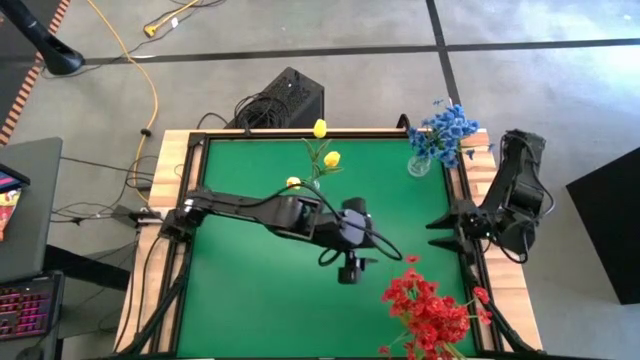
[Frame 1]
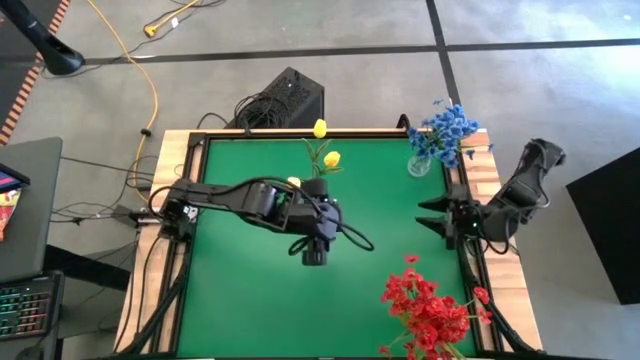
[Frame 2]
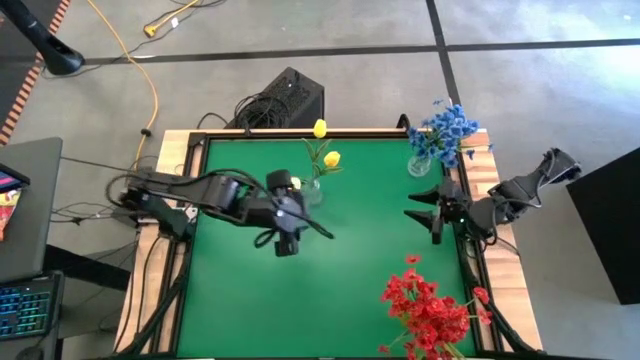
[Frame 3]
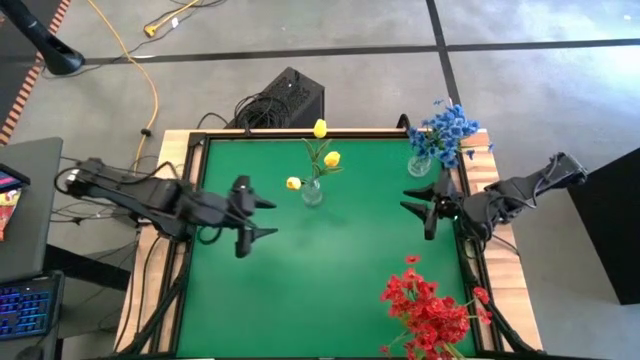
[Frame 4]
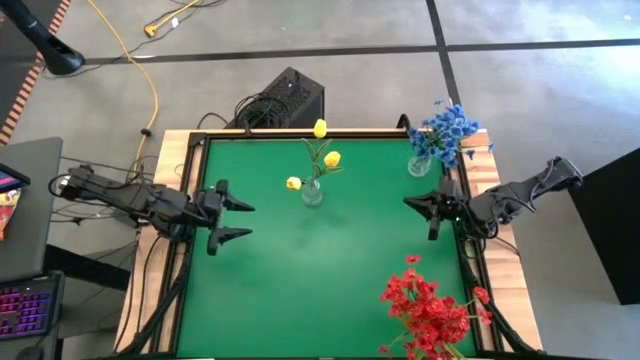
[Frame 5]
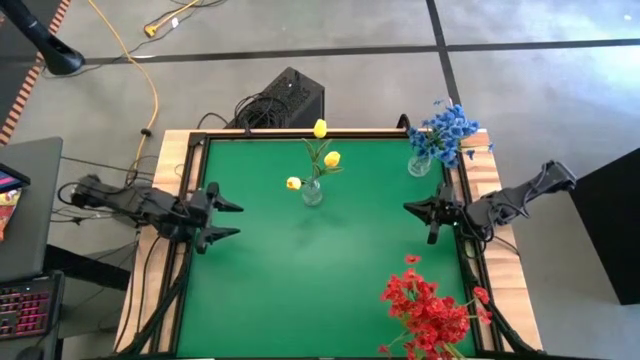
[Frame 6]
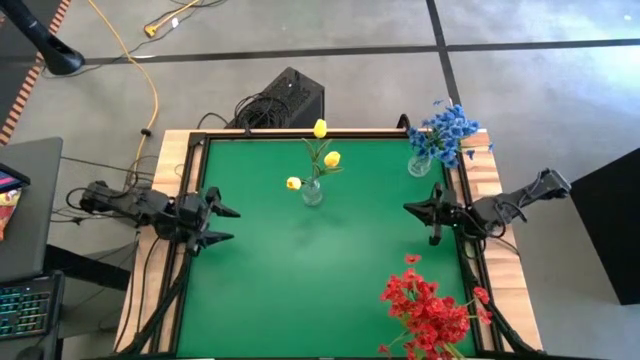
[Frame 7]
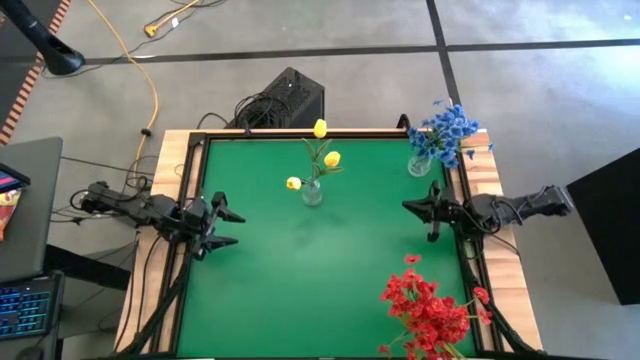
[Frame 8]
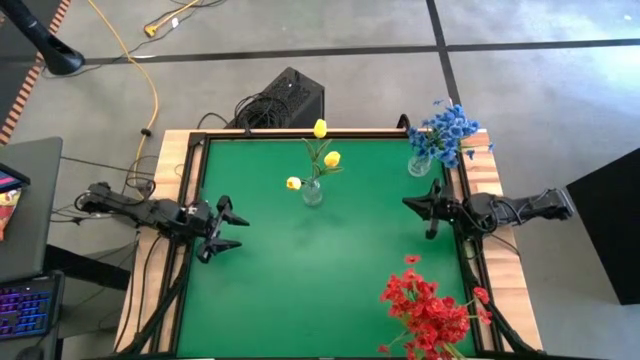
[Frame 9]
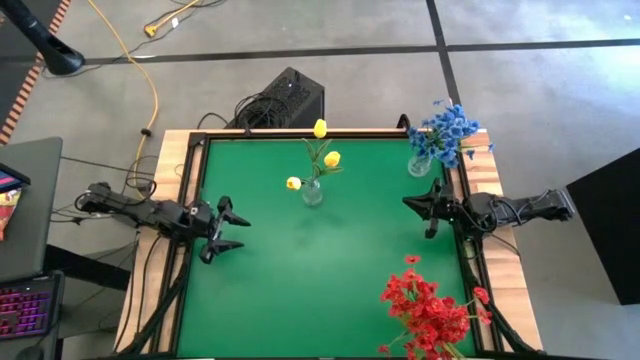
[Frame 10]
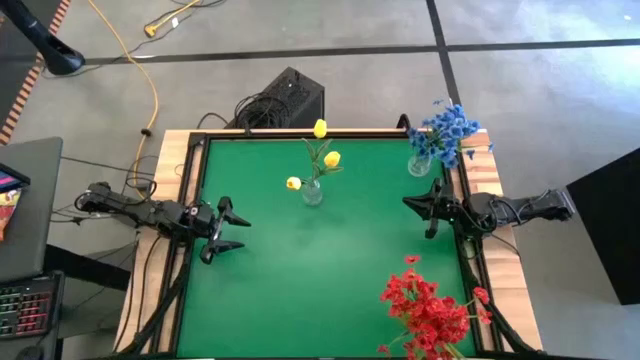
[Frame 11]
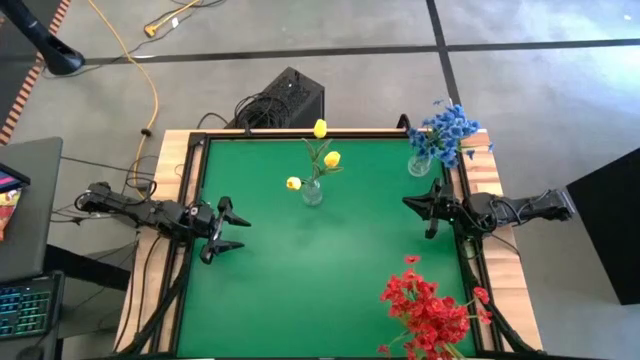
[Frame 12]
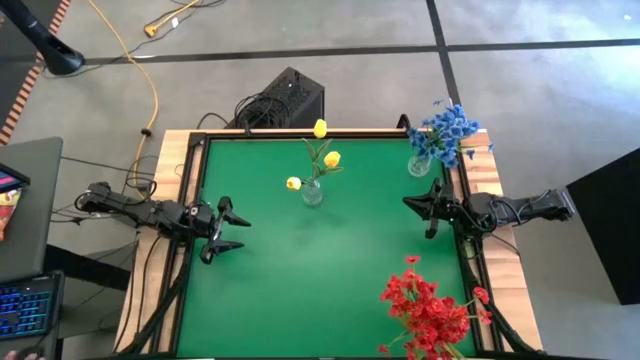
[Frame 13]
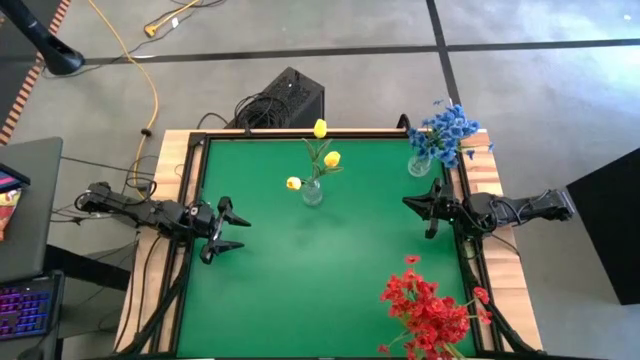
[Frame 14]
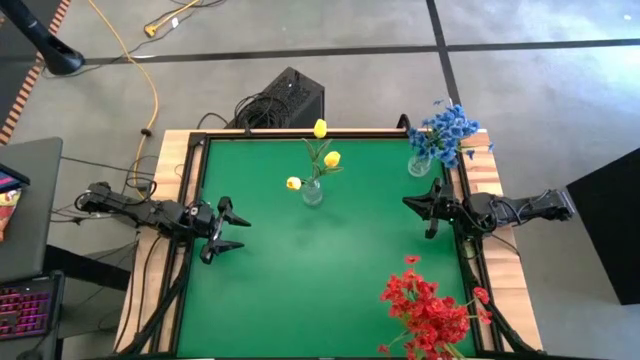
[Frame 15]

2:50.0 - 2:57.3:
Task: Sort flowers into vase by color
Return to Home Position

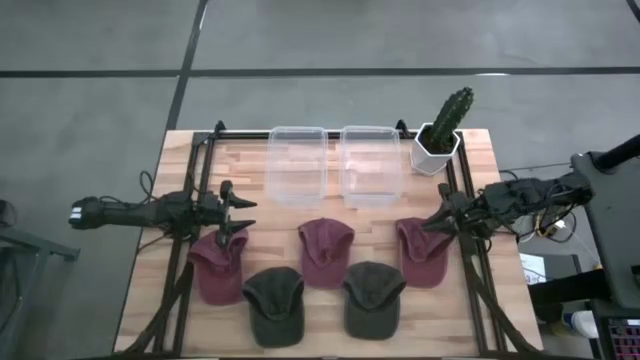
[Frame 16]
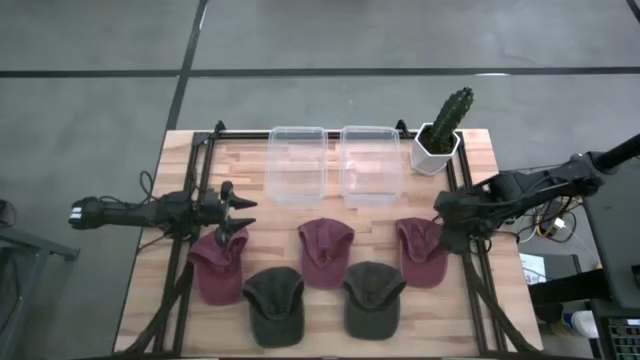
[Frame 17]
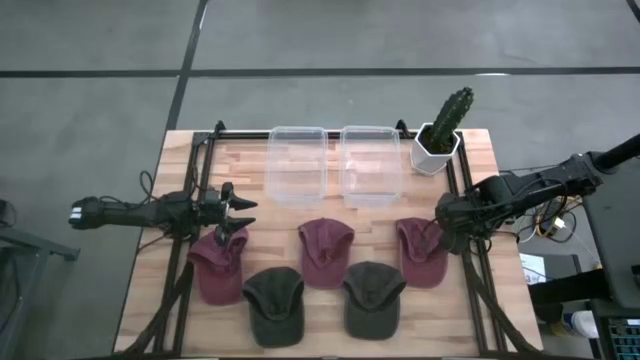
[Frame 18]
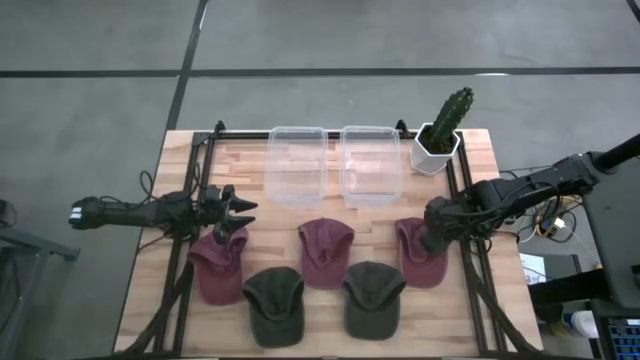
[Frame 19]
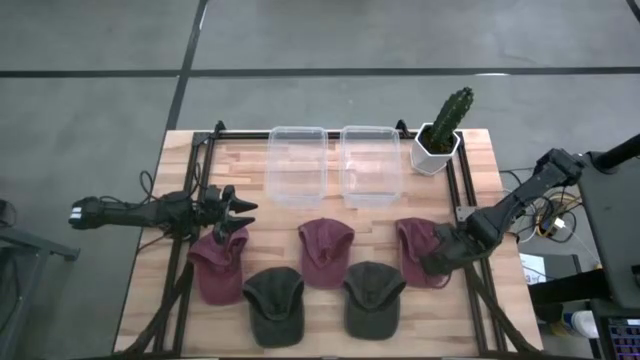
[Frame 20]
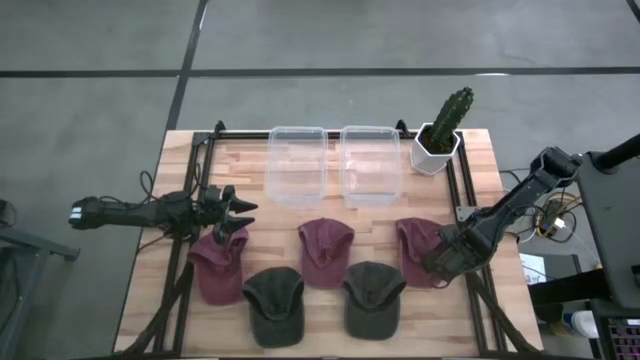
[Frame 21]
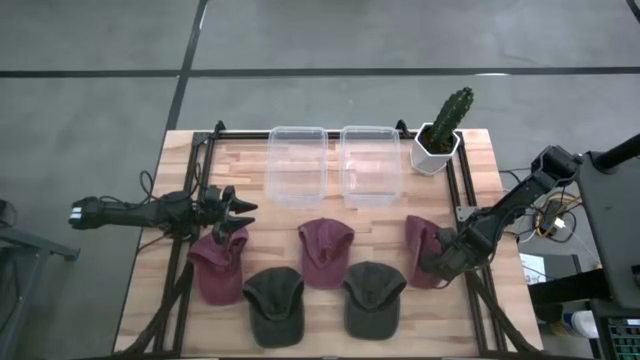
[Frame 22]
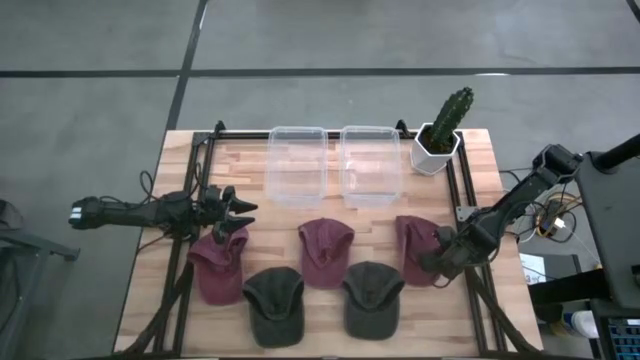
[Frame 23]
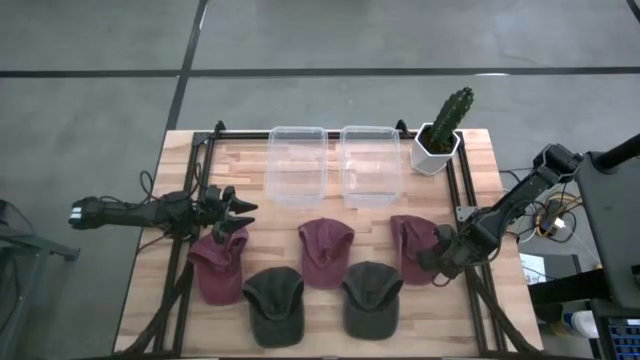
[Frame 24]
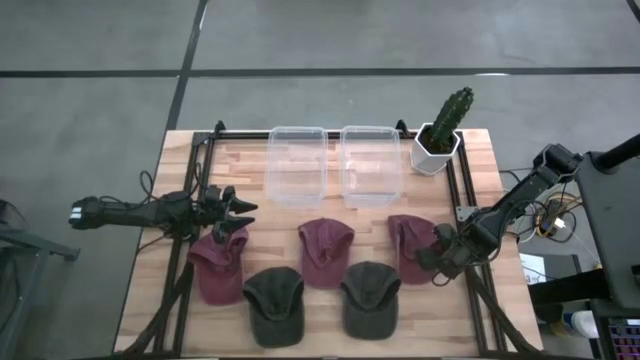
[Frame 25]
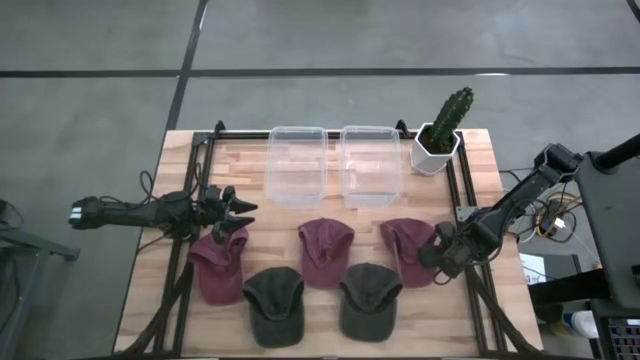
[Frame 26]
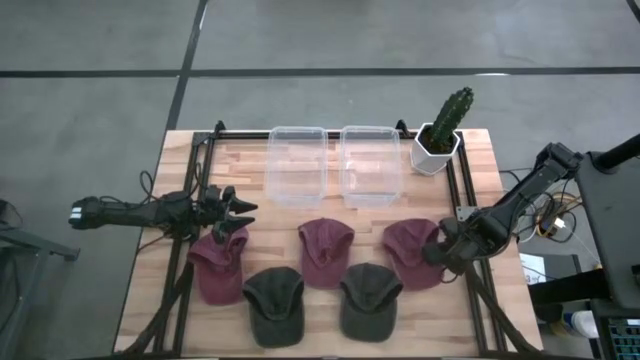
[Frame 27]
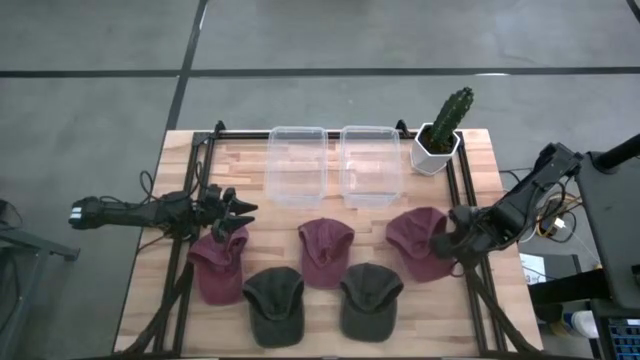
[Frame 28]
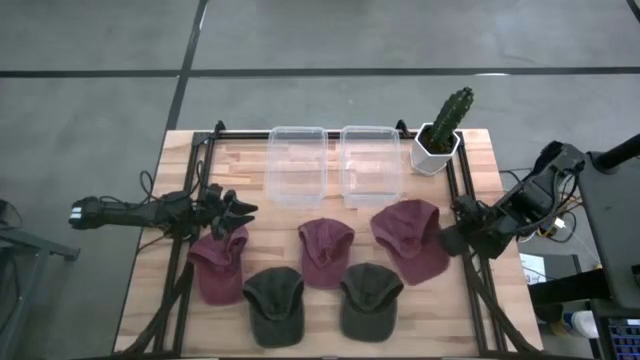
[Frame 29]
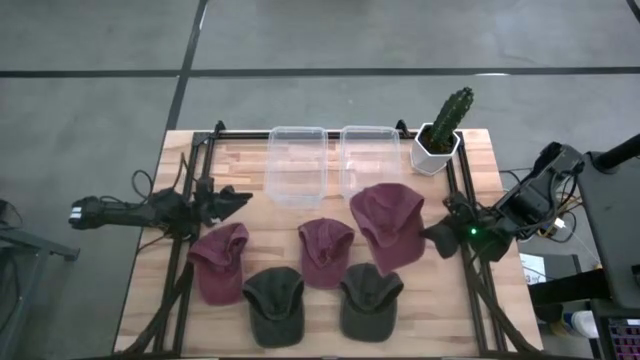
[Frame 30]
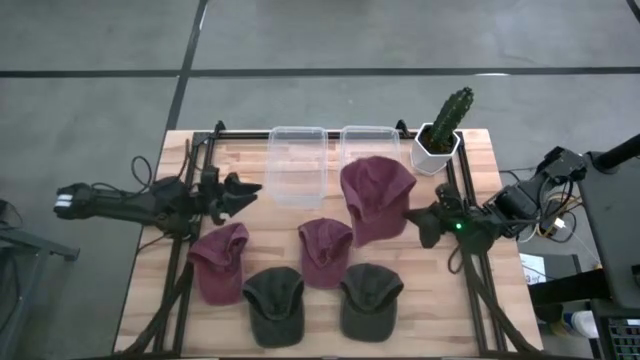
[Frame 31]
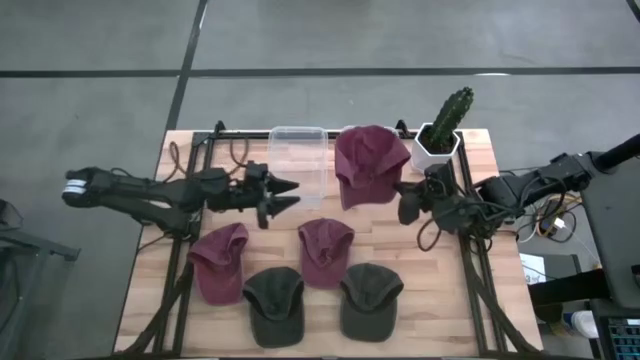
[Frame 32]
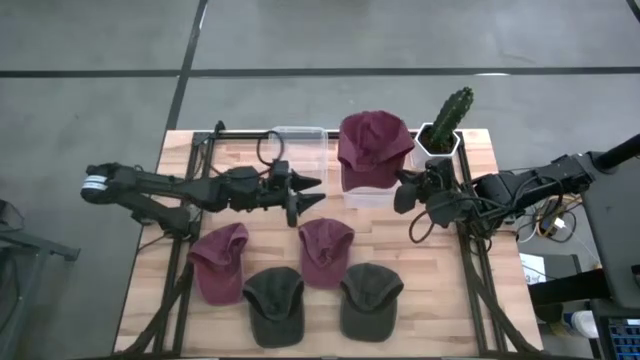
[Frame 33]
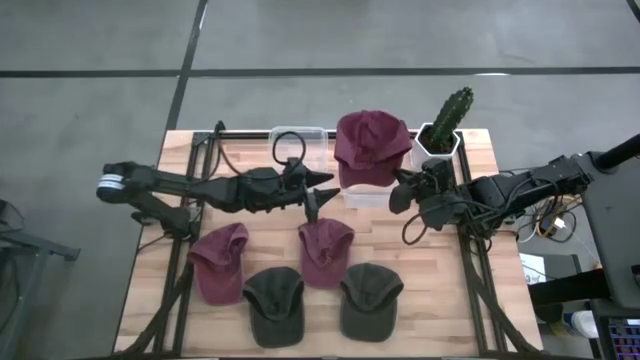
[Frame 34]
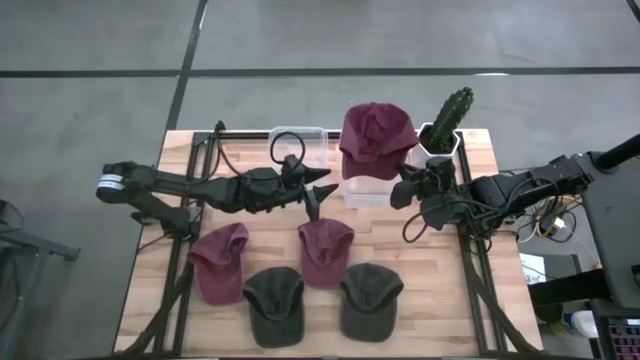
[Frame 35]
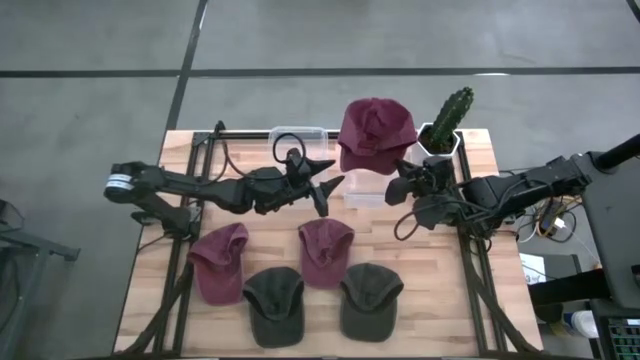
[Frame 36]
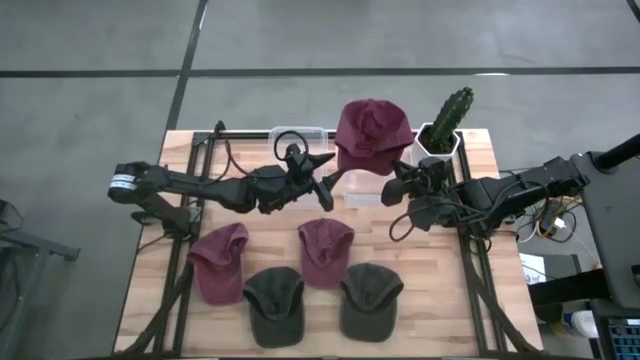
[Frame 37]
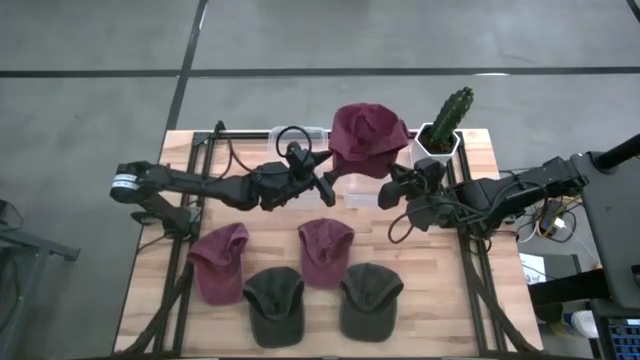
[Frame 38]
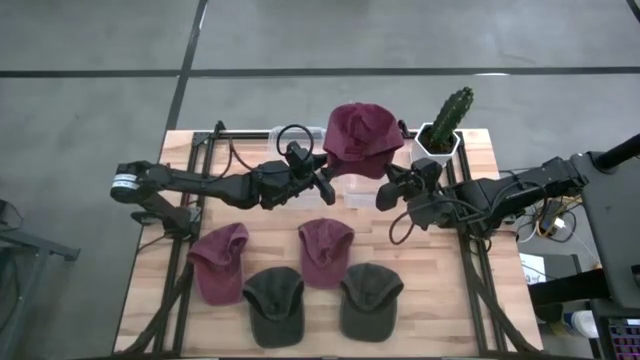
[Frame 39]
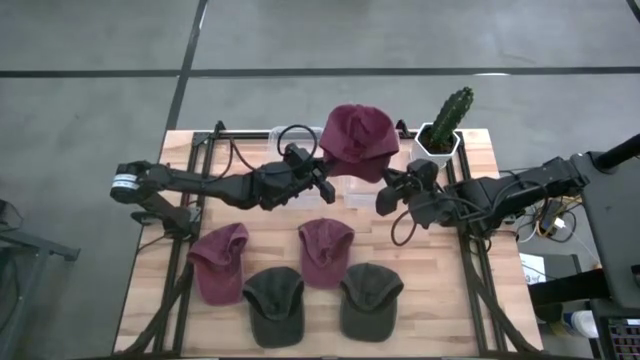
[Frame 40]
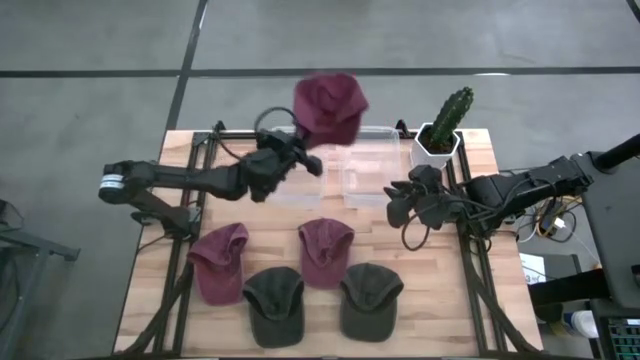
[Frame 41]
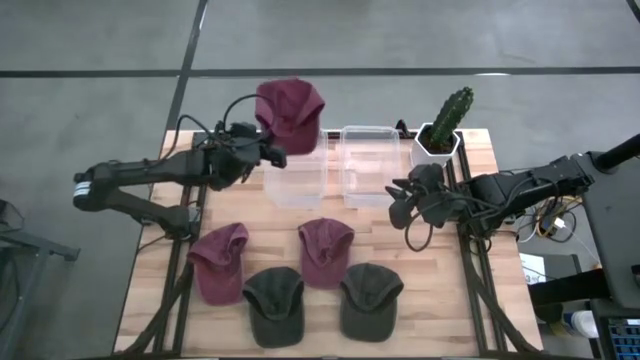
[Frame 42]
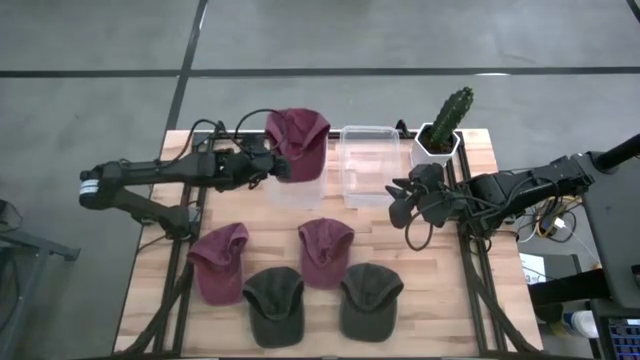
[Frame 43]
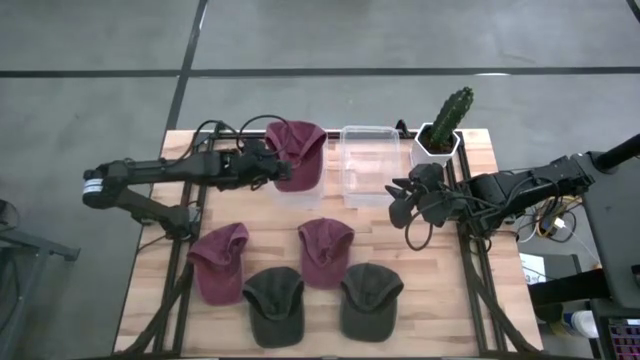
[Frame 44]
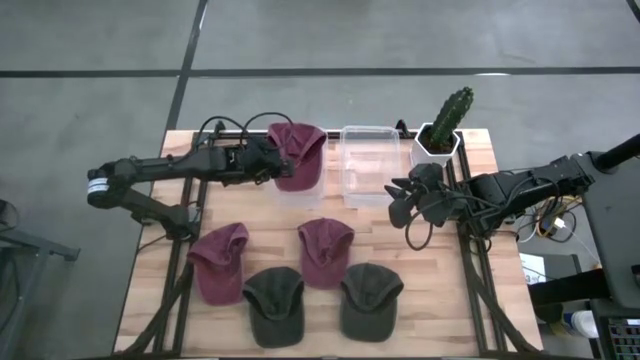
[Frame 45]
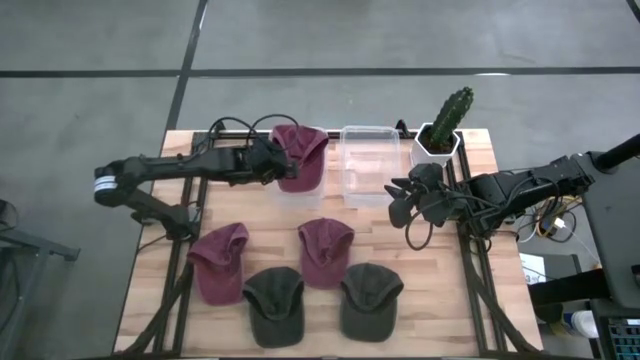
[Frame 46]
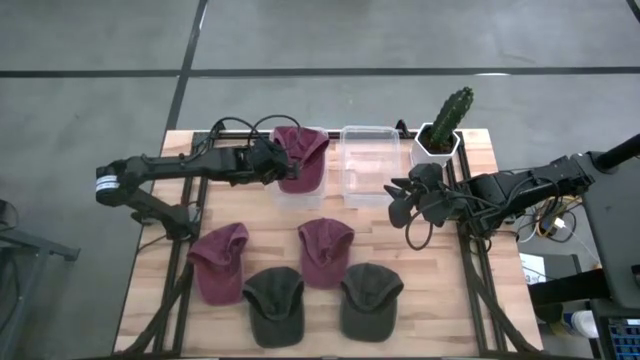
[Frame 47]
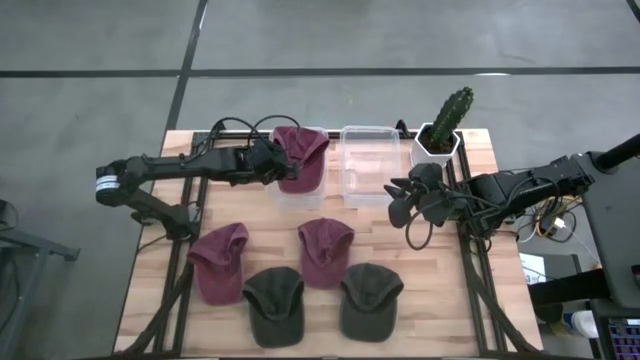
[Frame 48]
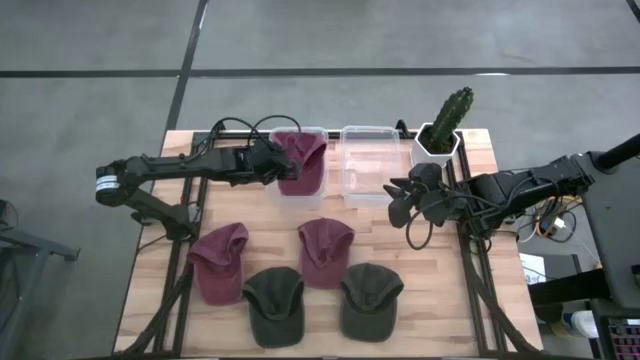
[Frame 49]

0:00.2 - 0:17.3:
Task: Pick & Place hat
Put the right red cap into the left transparent bin
